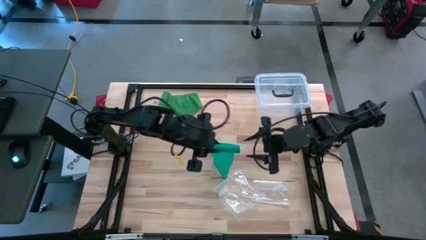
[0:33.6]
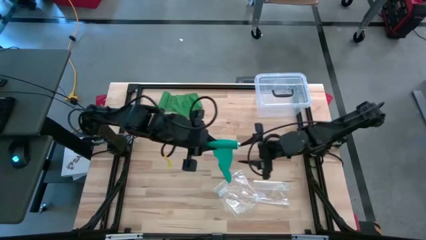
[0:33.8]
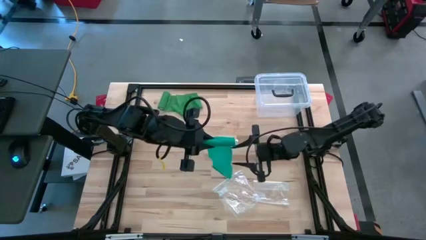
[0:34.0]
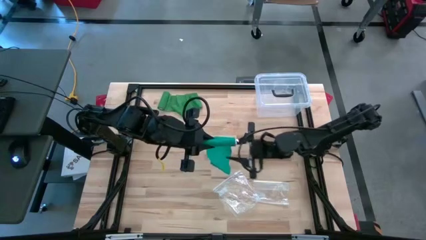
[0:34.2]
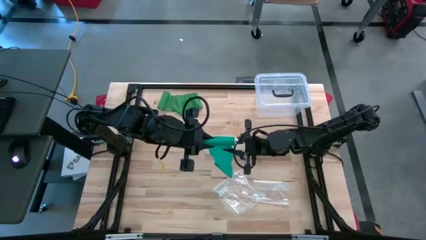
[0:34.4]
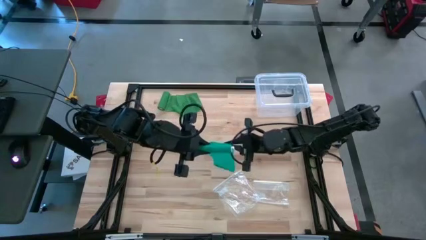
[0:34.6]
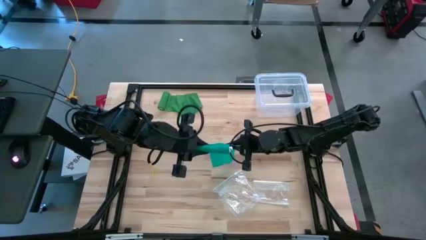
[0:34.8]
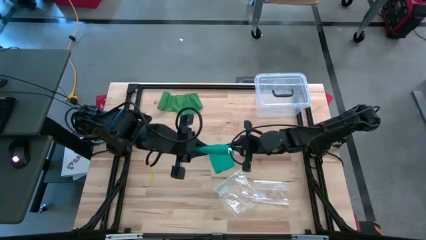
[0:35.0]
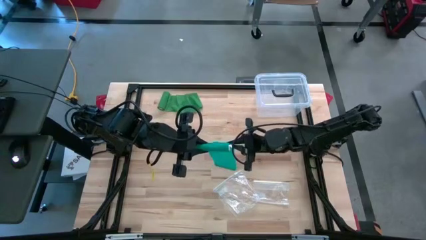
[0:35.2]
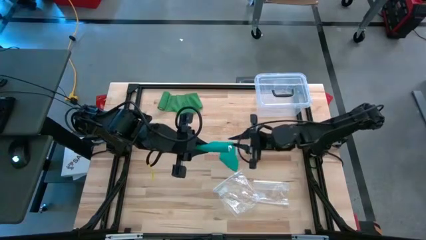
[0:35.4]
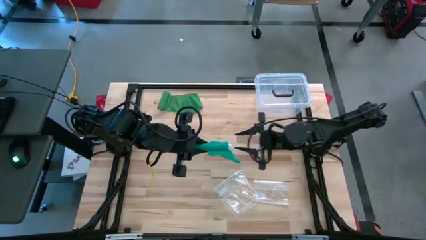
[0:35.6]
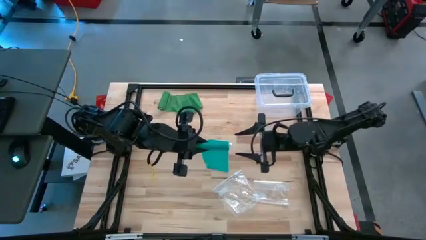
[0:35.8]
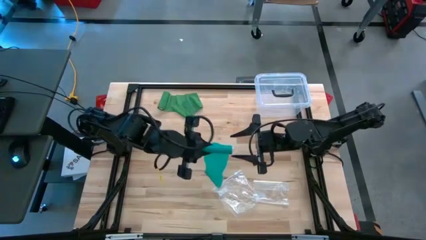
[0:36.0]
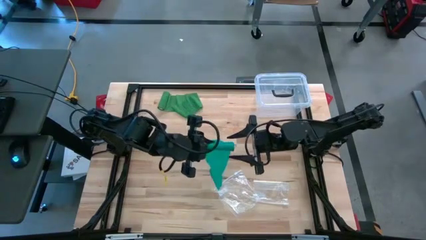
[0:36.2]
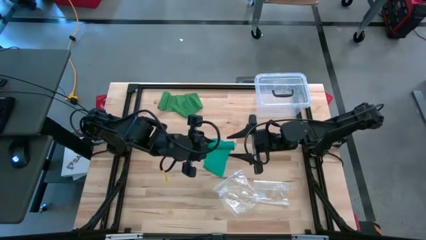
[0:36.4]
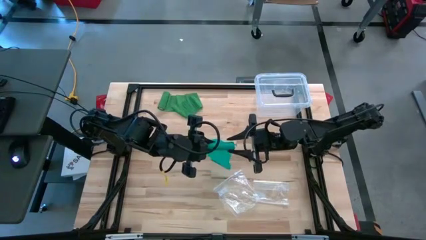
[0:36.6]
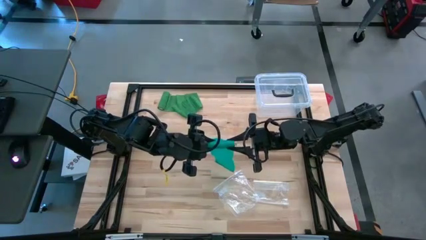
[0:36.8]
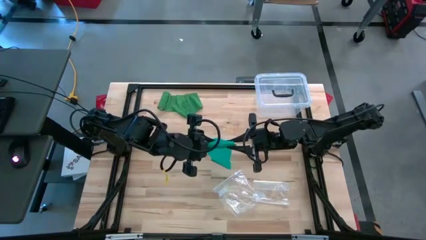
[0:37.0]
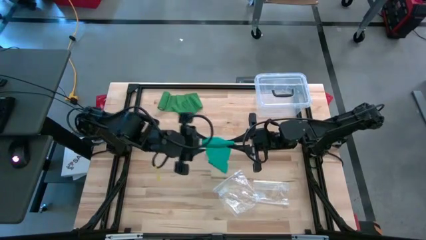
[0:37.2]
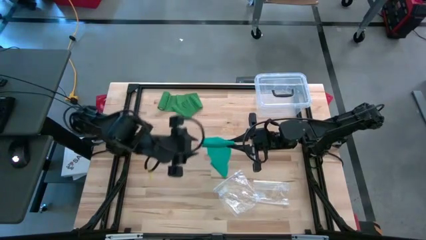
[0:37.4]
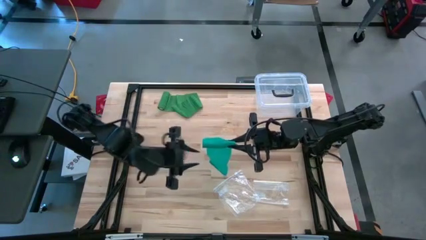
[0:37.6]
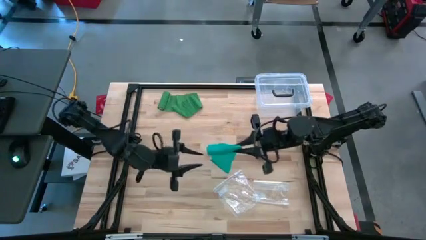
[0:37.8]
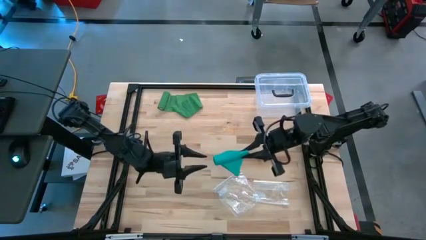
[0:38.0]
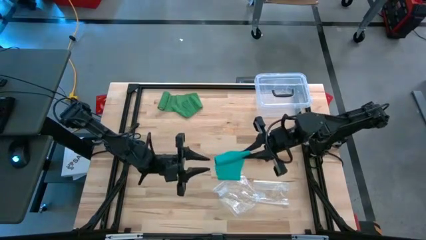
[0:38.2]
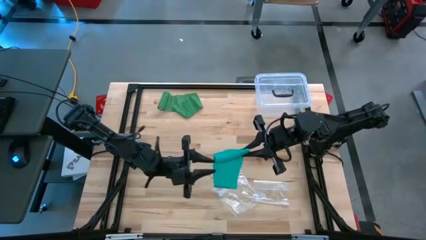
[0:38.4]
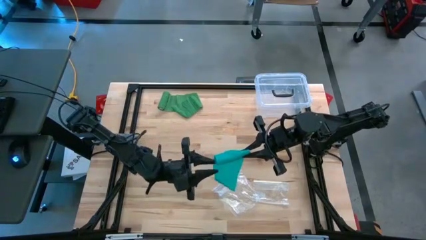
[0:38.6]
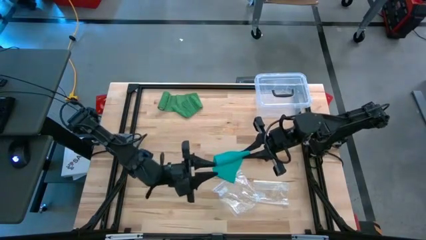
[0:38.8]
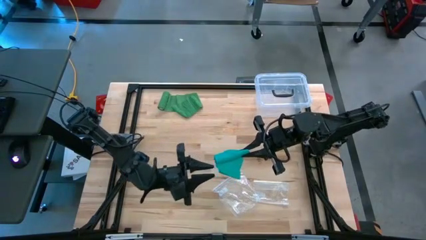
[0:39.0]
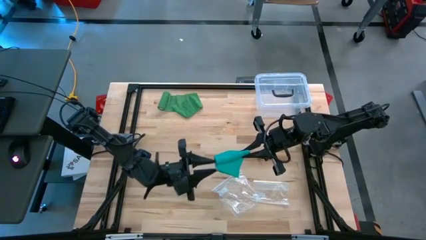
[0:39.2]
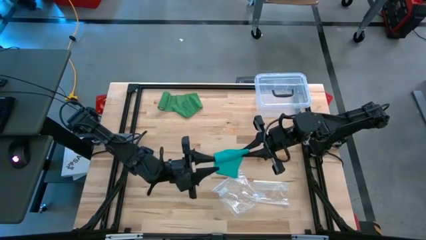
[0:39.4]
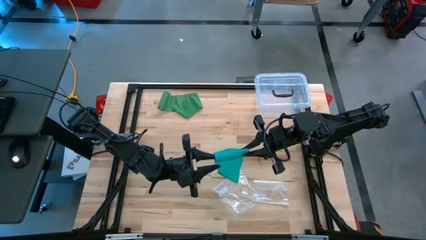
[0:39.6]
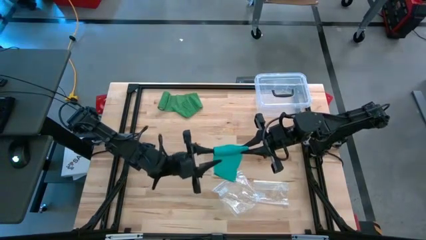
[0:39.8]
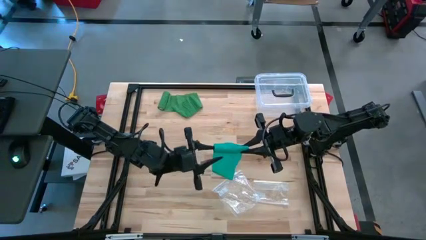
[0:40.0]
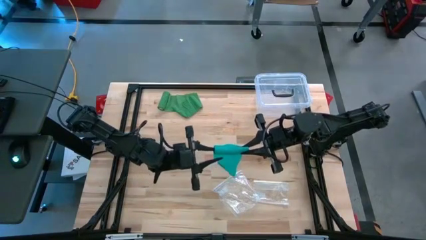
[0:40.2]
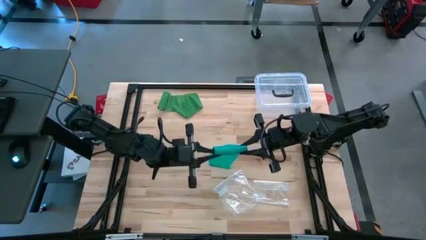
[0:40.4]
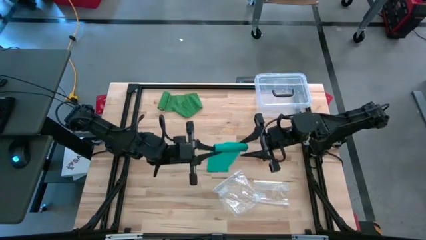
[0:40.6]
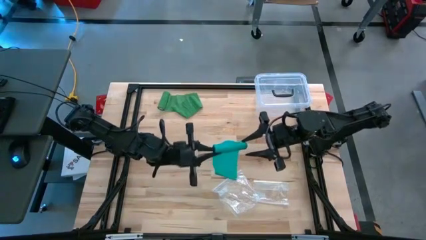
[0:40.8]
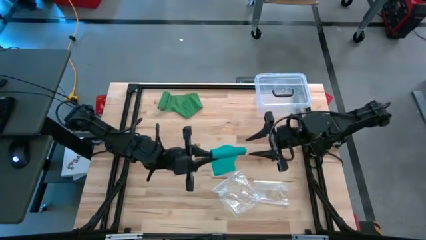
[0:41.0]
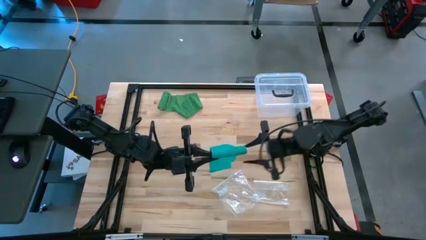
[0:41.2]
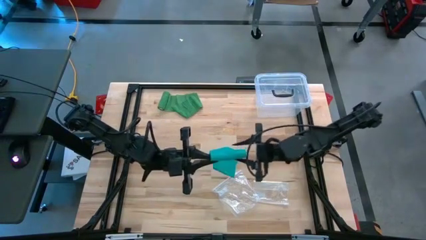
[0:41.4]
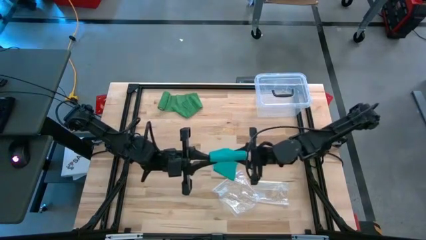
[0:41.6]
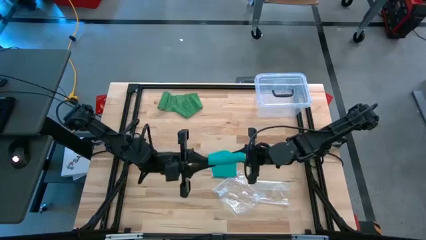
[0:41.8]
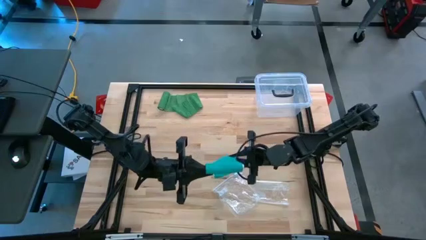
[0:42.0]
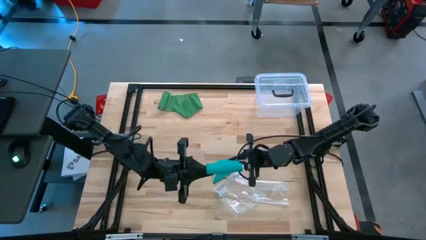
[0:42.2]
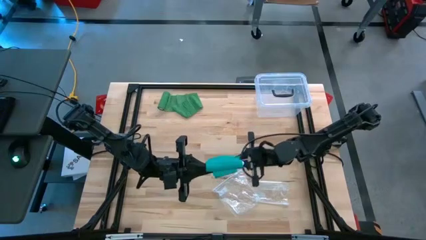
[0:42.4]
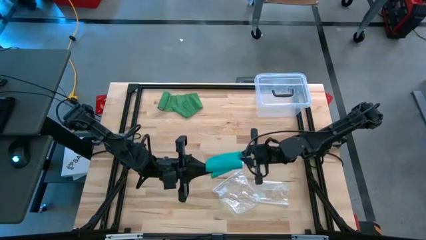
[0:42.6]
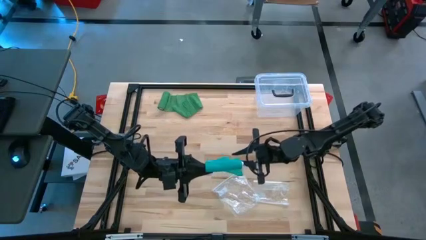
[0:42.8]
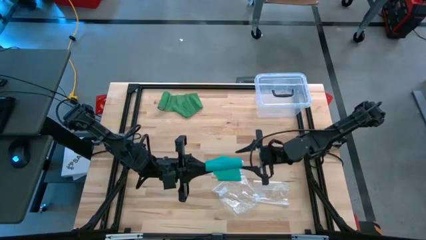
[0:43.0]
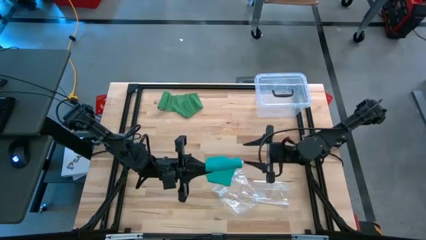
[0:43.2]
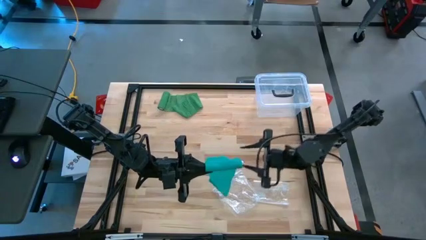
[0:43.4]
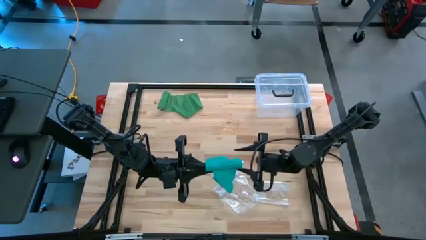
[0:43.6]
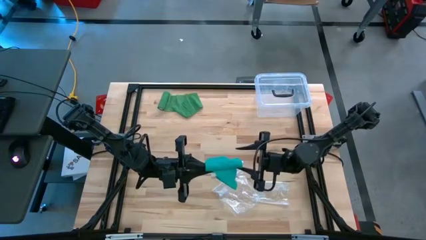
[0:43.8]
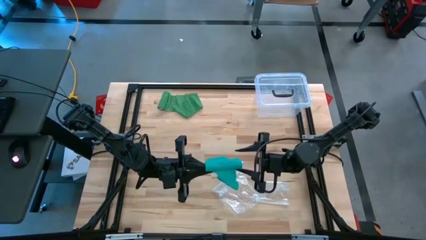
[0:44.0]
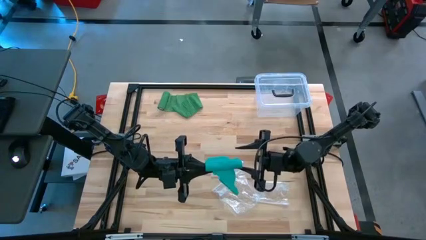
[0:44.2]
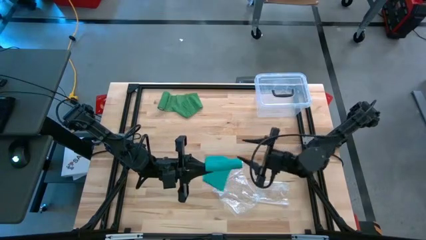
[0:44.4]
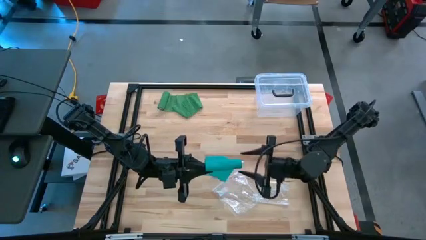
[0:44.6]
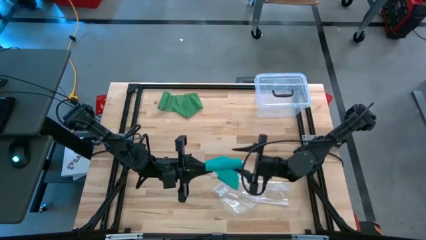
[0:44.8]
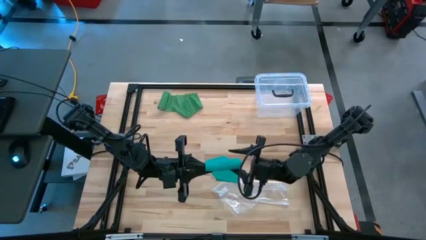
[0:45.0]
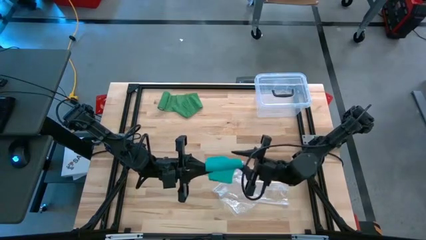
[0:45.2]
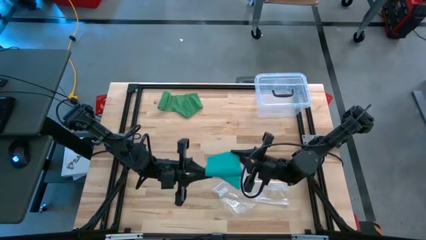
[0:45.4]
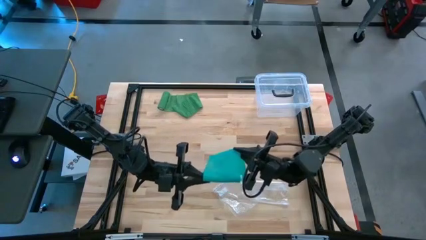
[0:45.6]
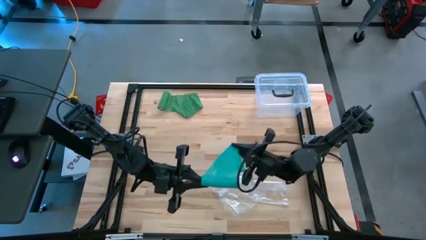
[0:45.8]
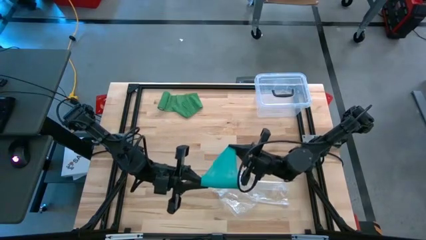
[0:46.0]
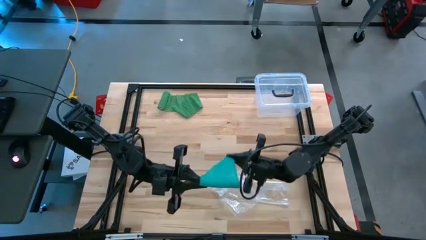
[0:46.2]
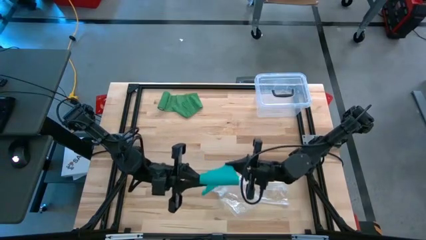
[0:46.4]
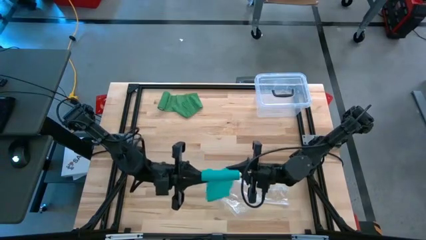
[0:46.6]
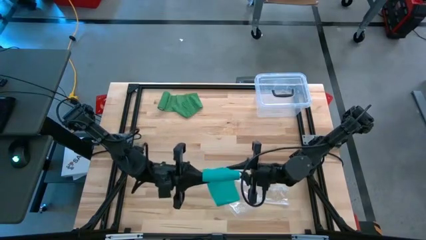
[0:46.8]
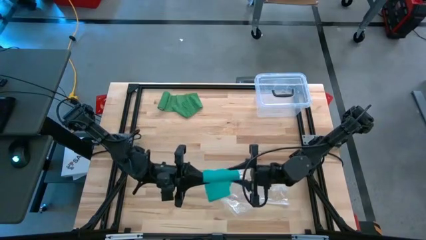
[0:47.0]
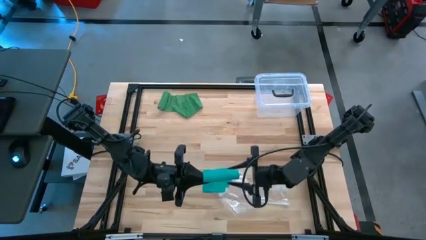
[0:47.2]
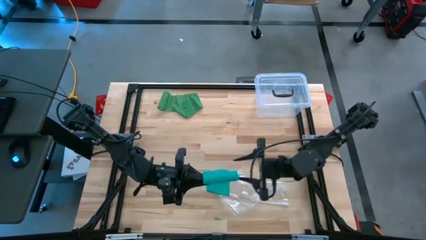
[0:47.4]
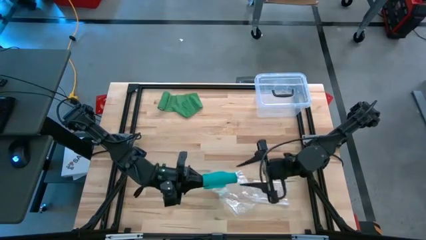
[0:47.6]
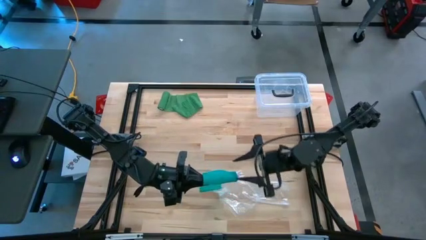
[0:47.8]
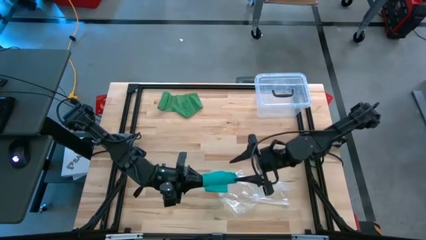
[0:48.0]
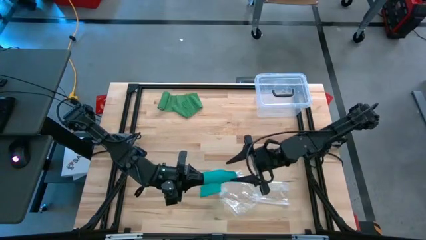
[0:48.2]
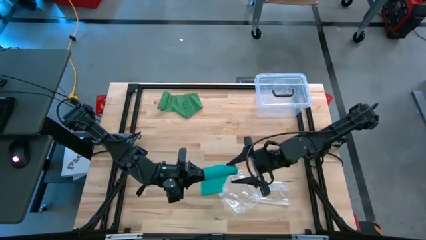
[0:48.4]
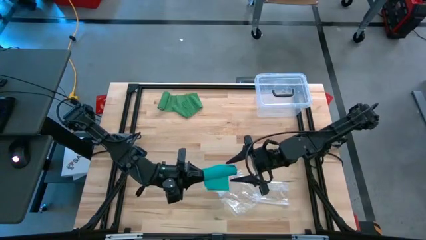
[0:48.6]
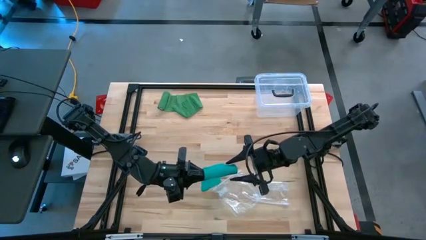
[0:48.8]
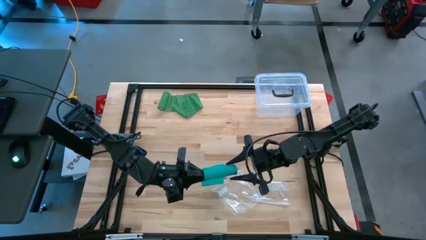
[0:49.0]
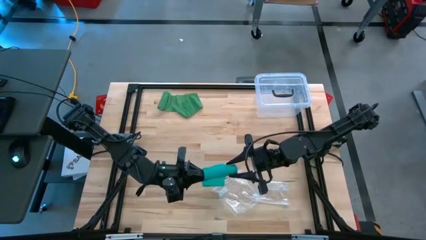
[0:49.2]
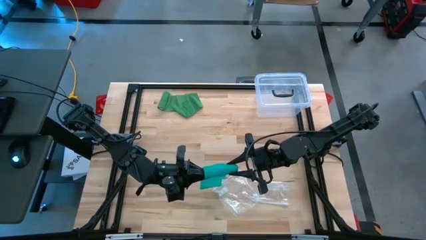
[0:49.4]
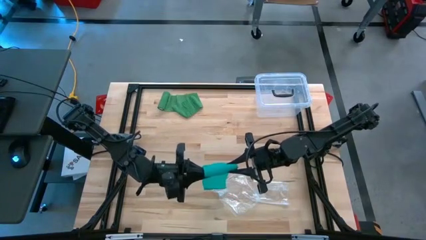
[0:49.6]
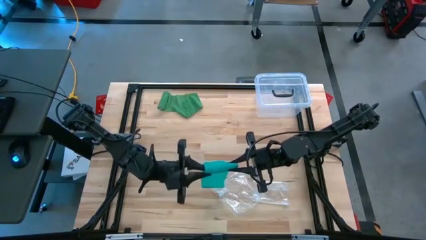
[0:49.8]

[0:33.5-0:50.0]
Task: Roll bandage
Roll the blue bandage
